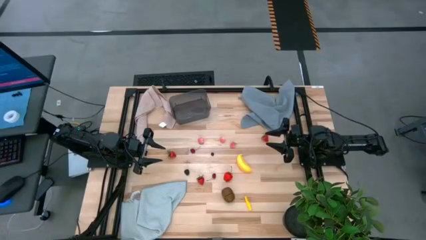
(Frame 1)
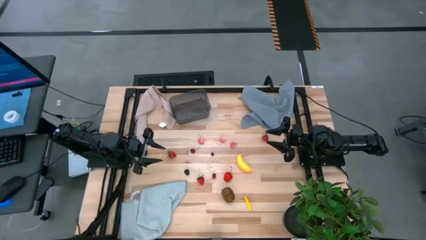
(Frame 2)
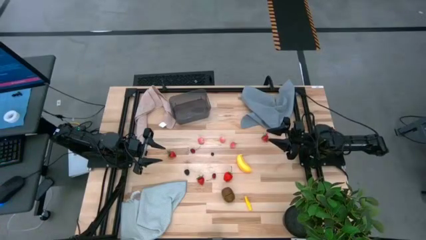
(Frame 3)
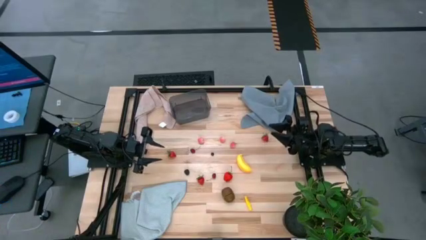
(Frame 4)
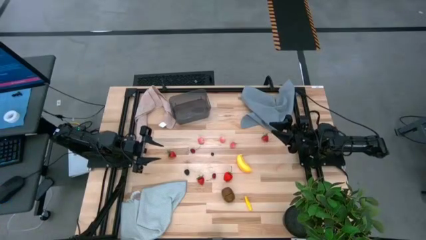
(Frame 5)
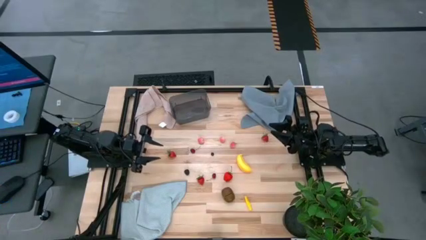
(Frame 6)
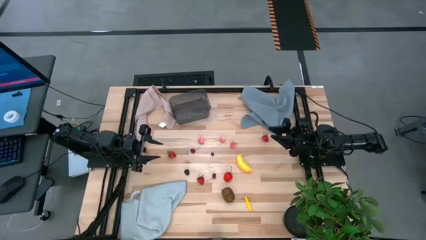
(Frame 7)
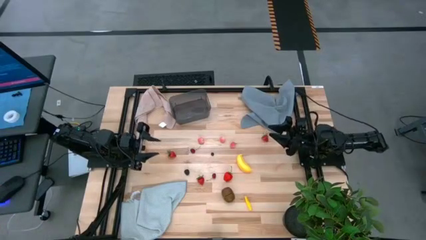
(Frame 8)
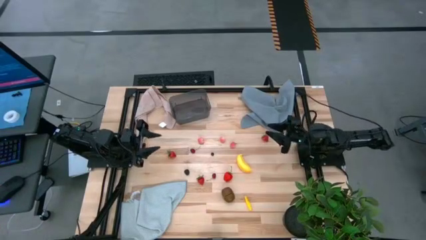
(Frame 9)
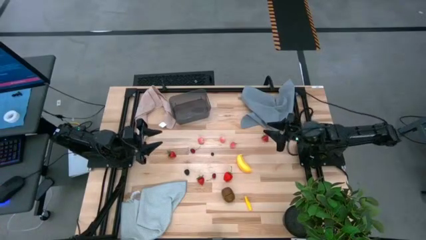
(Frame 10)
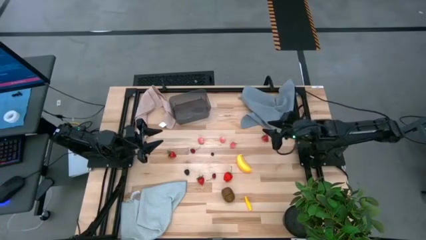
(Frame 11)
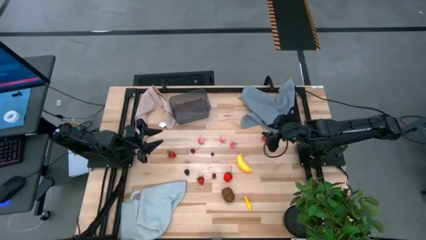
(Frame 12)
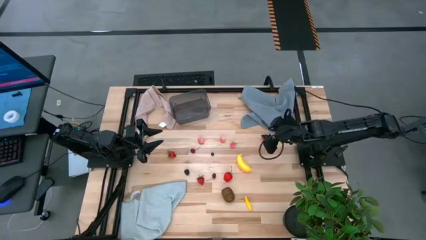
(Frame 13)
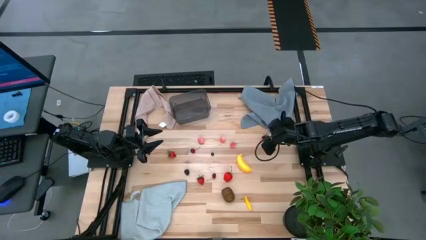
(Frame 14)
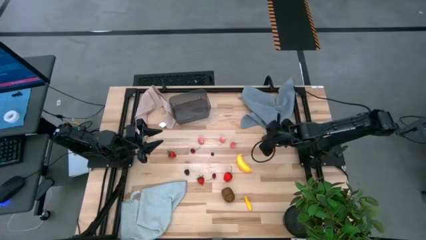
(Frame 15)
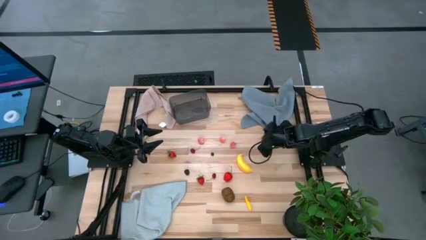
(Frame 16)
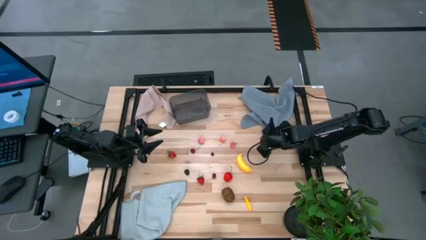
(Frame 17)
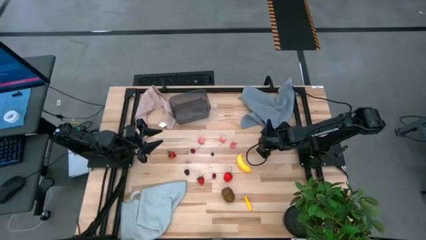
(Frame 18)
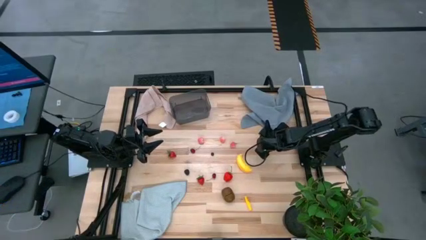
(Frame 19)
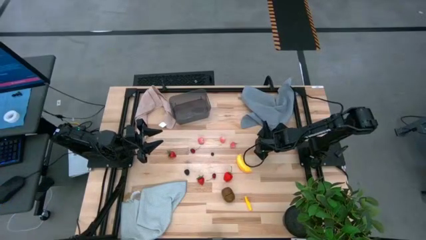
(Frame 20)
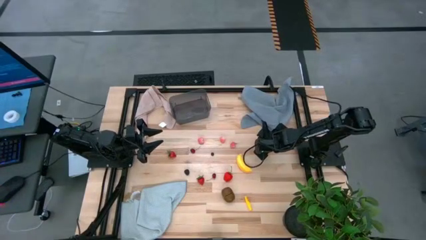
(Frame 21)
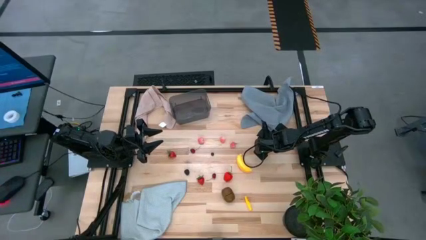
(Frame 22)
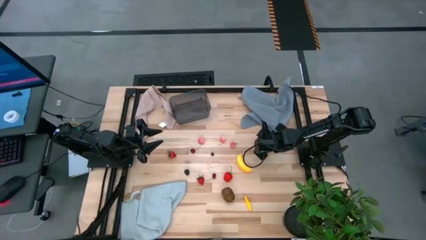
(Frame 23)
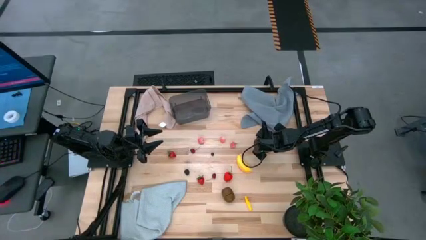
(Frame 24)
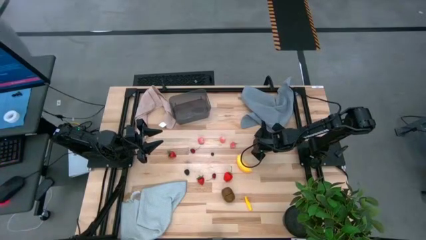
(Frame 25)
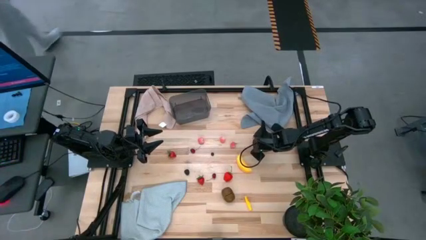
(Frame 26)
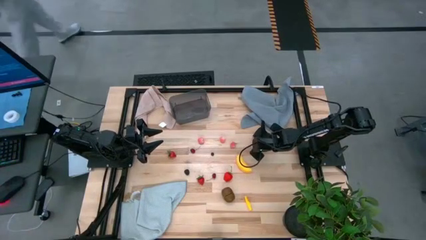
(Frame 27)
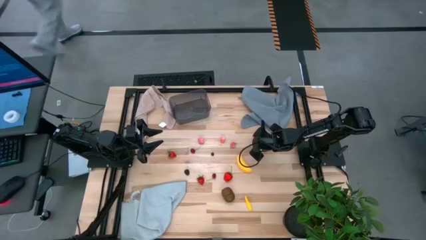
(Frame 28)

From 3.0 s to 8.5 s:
Task: Pick and placing Produce into tupperware
Put the red strawberry into the black bin

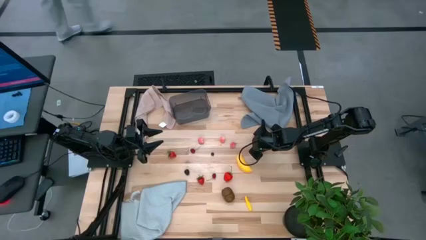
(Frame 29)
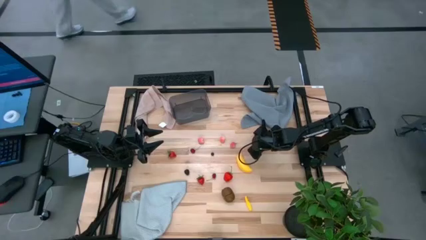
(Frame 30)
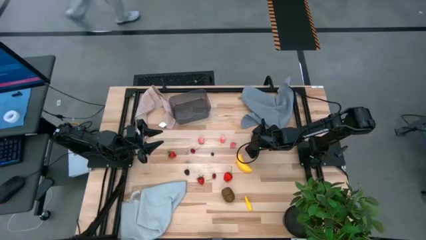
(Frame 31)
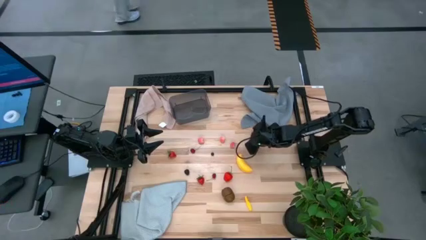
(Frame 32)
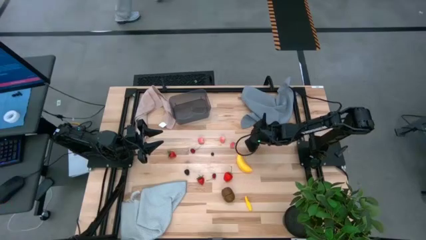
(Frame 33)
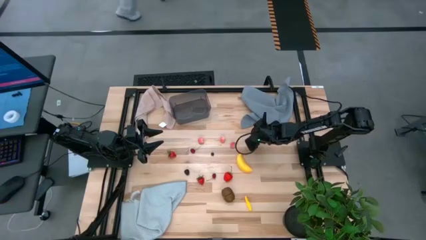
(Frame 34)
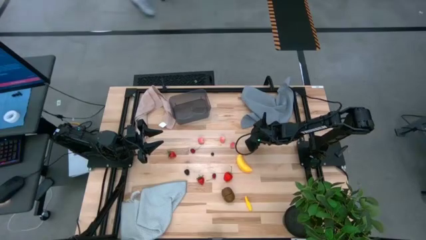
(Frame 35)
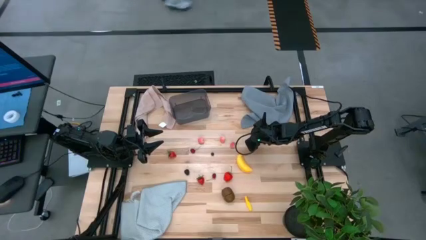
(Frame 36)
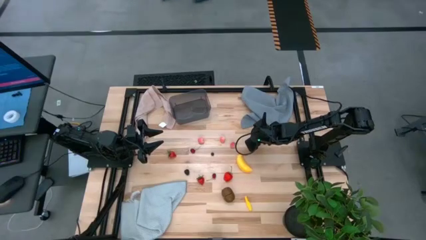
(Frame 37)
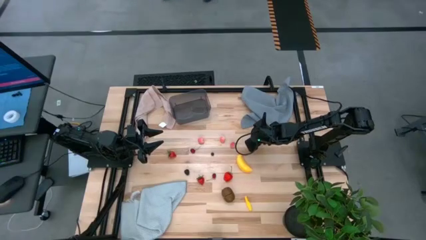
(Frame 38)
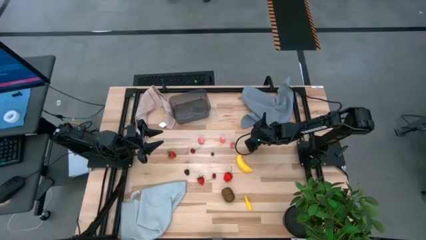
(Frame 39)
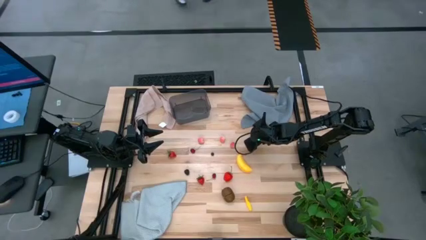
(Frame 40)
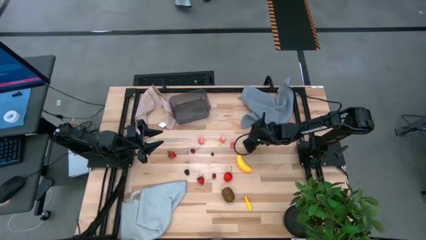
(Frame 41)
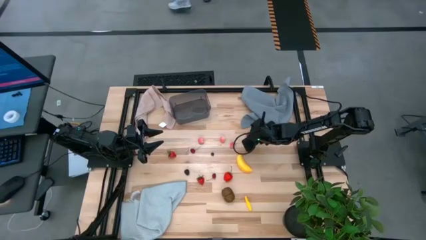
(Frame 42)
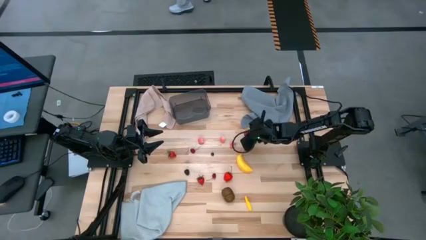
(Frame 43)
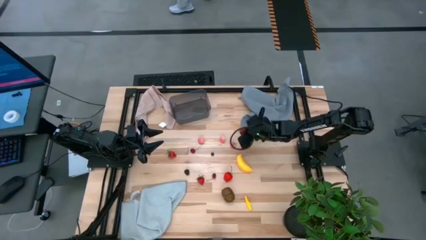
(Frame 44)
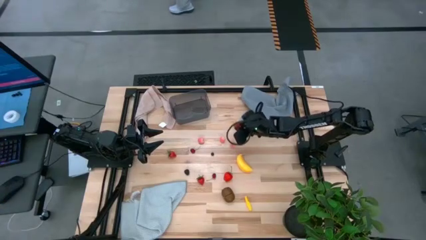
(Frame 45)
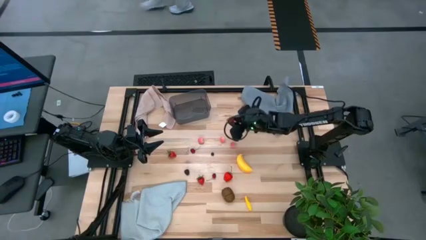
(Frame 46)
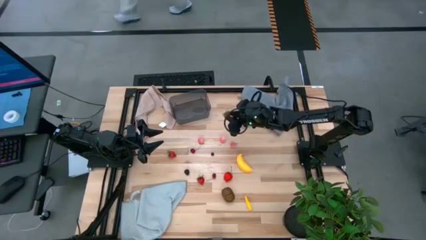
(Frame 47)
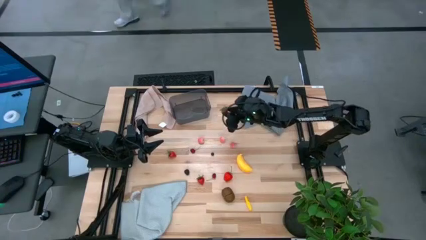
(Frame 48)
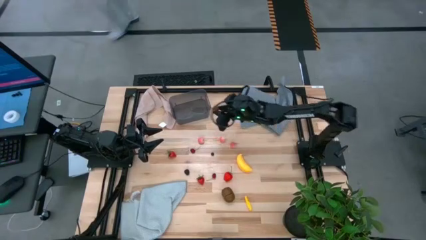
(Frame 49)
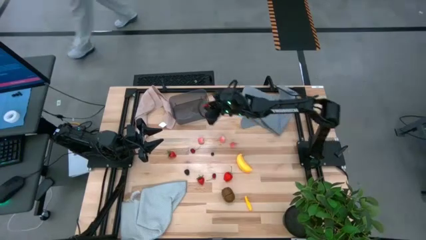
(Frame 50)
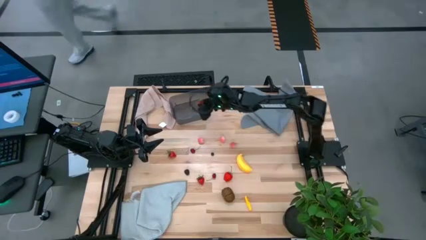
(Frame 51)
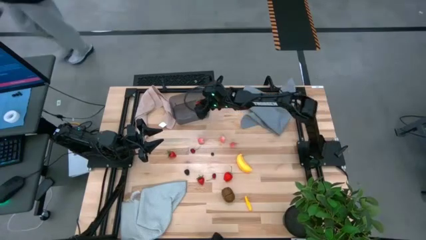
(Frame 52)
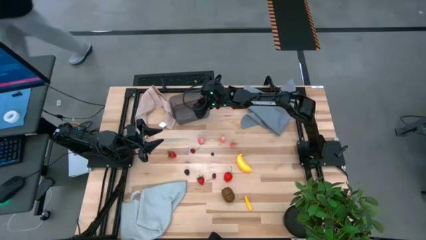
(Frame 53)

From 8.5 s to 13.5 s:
Put the red strawberry into the black bin

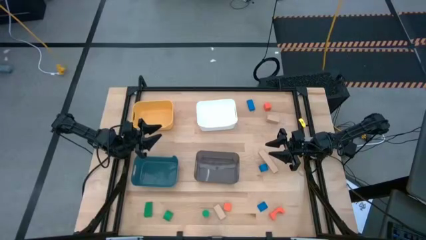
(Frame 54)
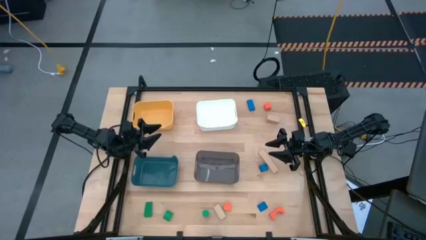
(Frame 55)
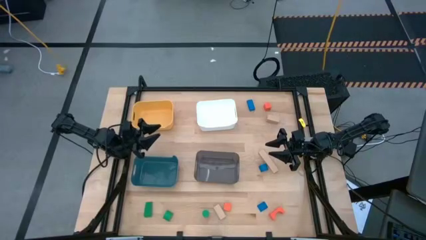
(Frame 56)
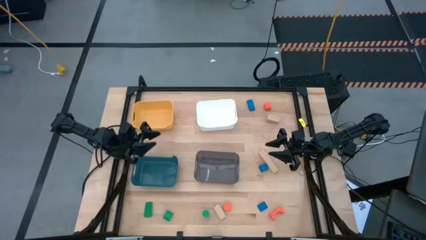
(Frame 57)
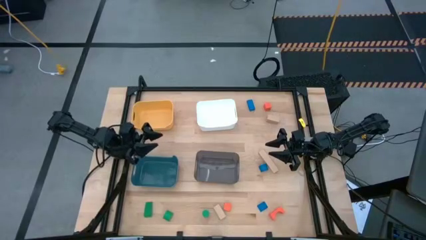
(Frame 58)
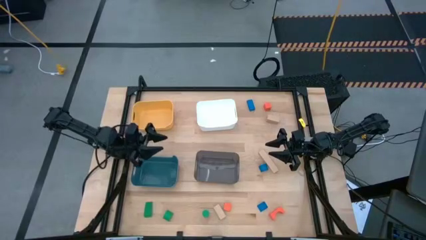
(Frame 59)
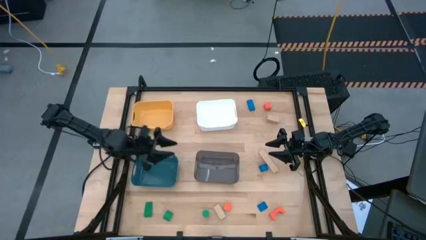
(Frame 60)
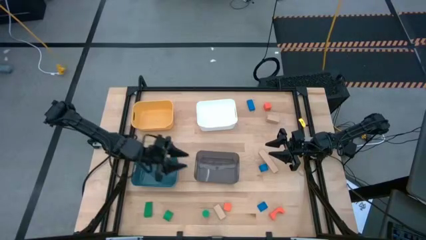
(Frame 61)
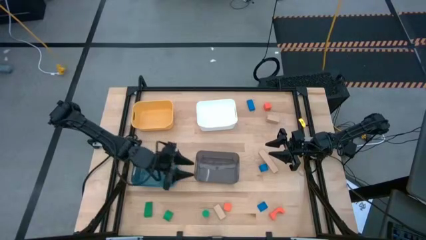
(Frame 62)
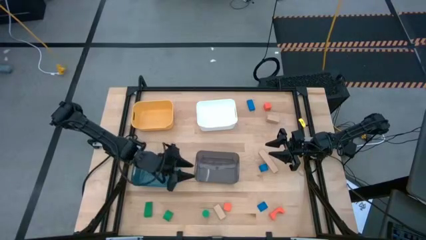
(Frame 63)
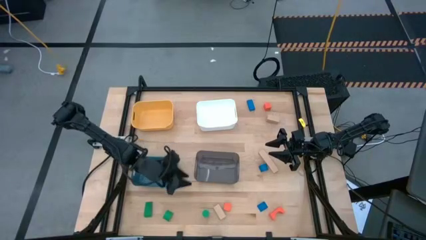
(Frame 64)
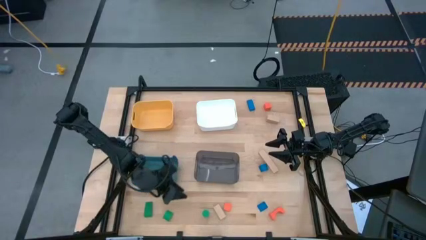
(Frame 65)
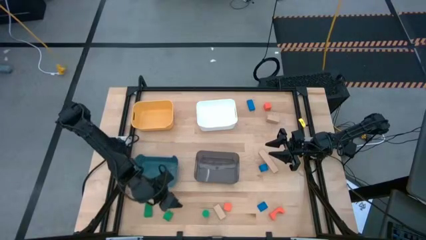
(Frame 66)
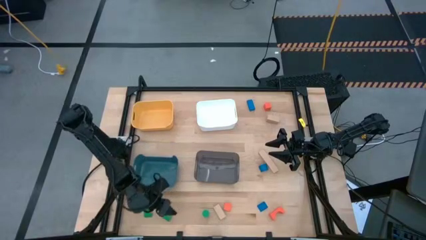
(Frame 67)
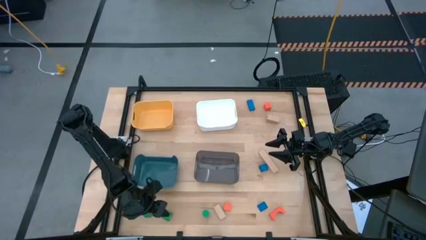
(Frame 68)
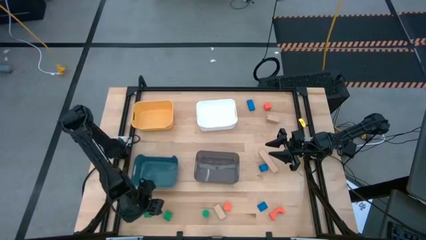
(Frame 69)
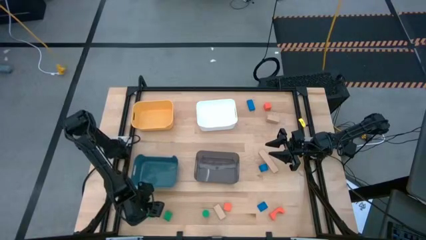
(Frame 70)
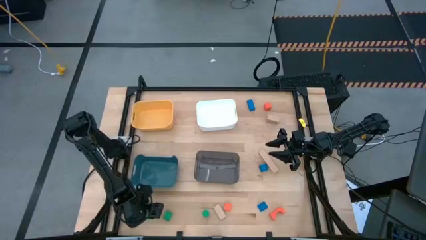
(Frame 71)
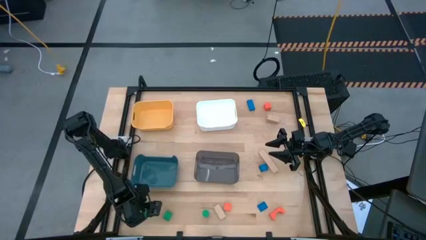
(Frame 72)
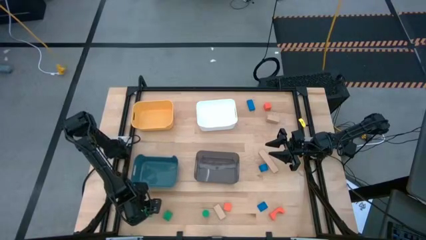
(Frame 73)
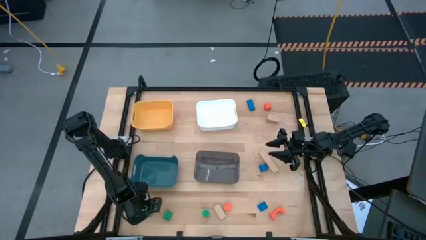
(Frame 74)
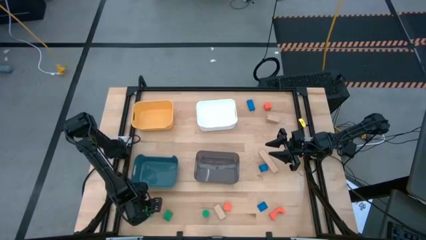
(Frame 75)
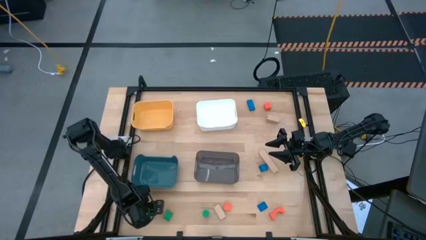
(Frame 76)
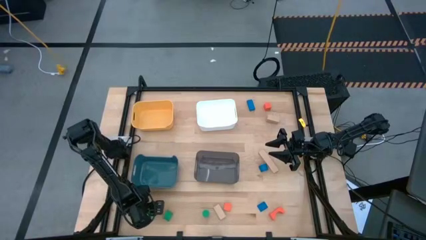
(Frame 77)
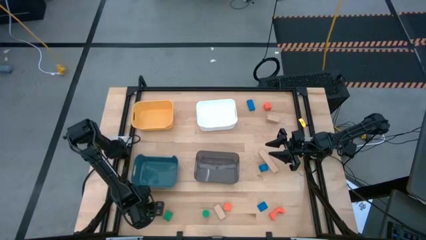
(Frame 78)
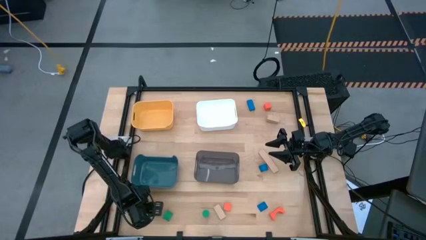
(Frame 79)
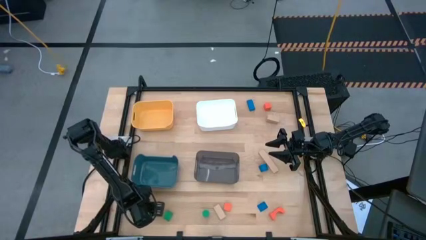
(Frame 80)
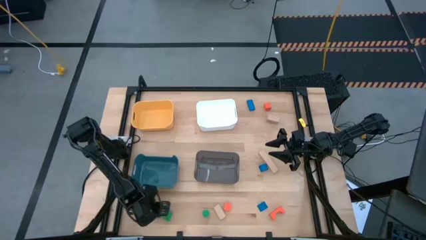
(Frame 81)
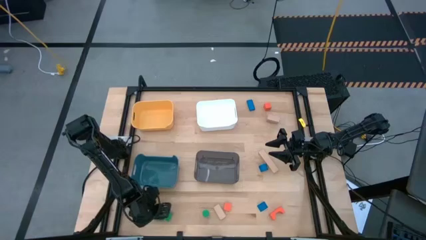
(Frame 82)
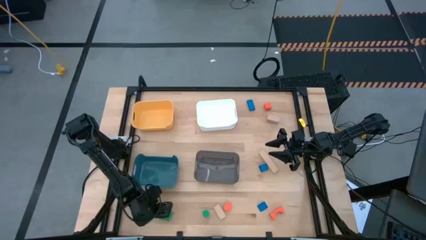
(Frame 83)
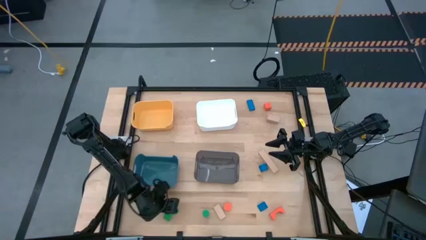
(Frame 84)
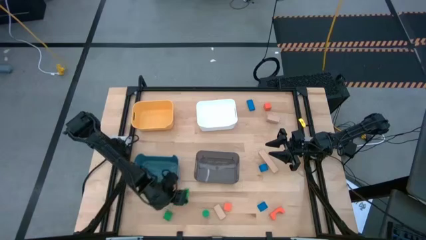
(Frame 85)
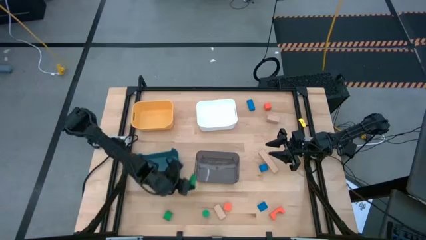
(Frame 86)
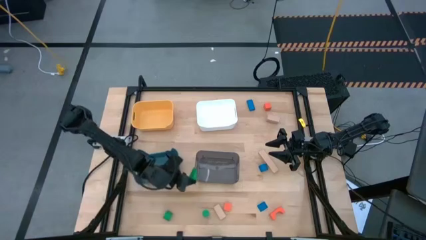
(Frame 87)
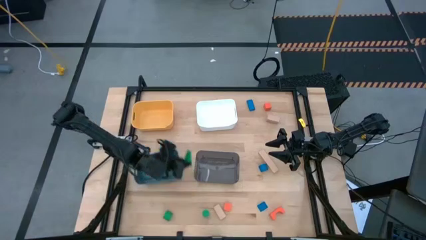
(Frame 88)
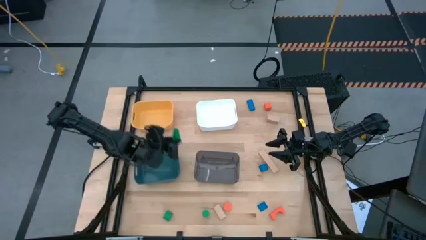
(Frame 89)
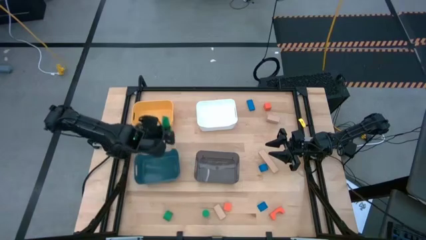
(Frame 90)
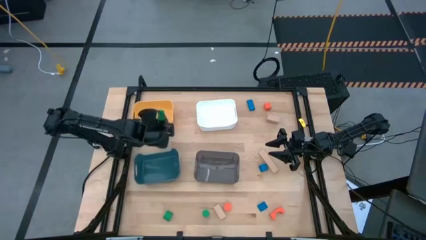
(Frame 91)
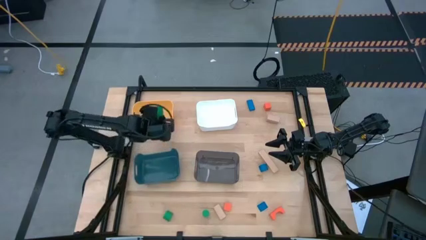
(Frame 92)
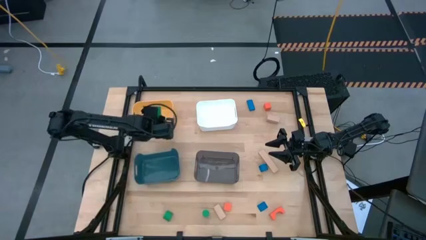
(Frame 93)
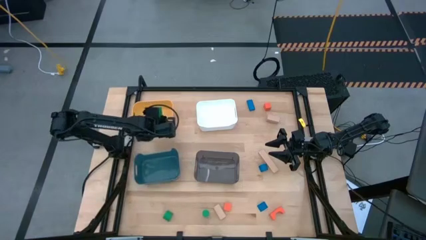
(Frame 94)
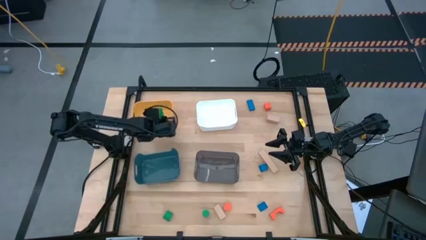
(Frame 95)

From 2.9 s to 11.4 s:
Task: Sort & place blocks by color
Put the left green block into the yellow bin
